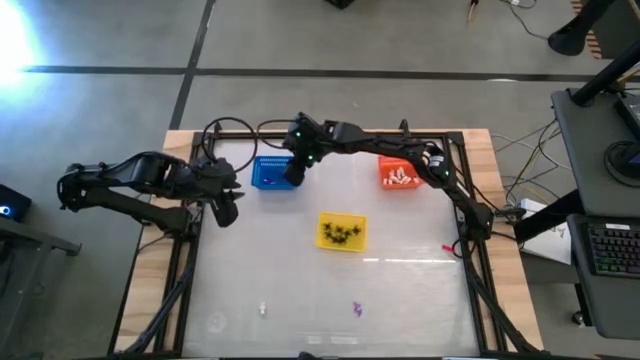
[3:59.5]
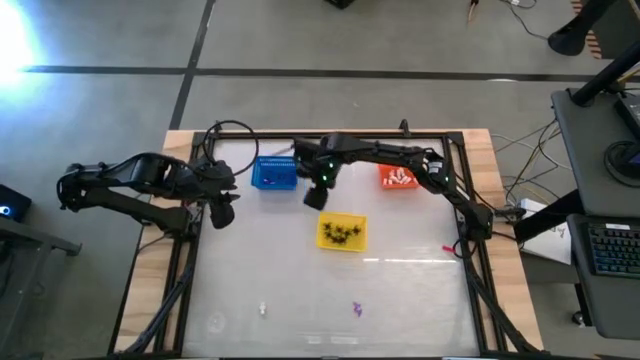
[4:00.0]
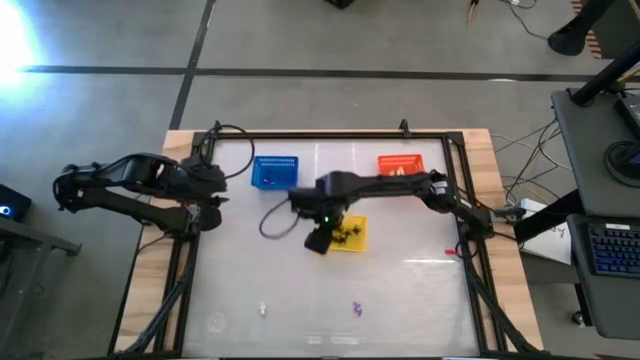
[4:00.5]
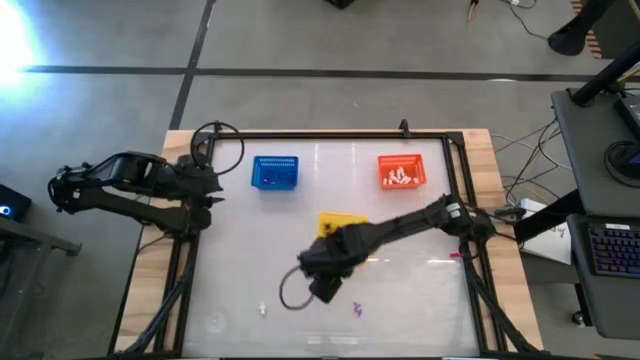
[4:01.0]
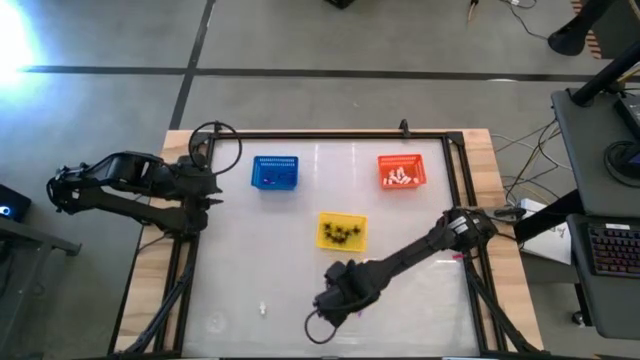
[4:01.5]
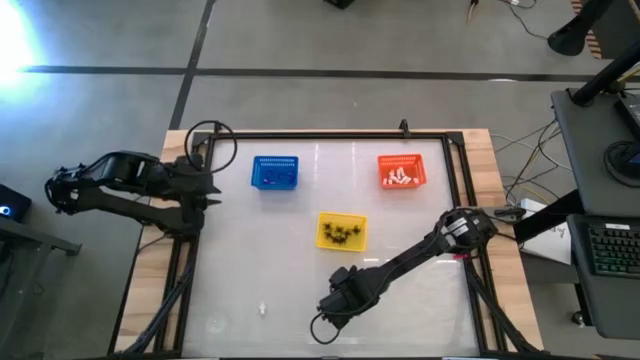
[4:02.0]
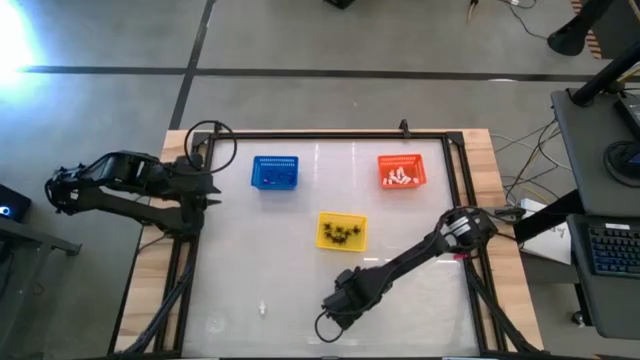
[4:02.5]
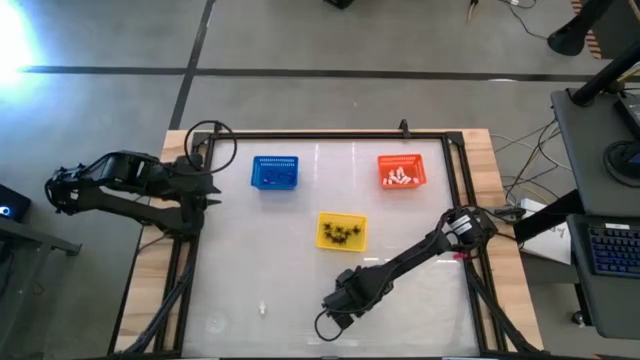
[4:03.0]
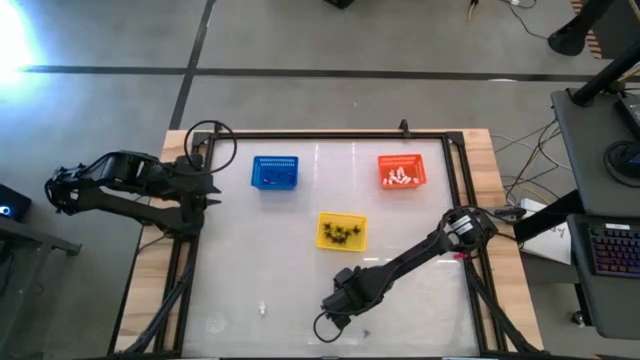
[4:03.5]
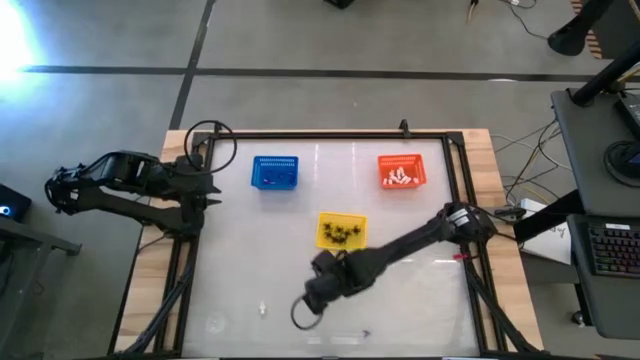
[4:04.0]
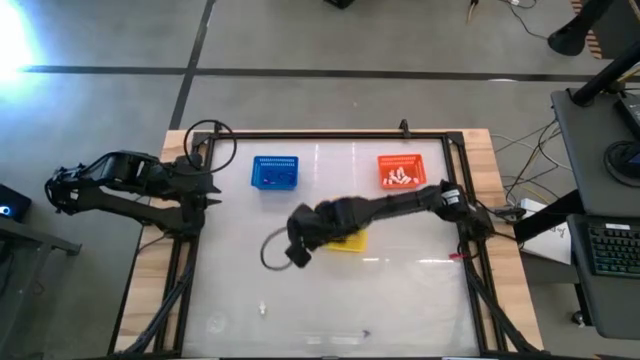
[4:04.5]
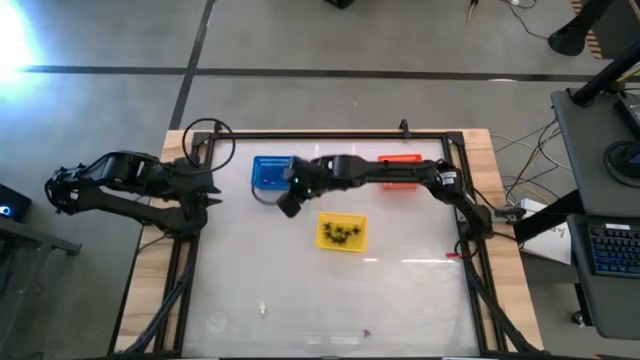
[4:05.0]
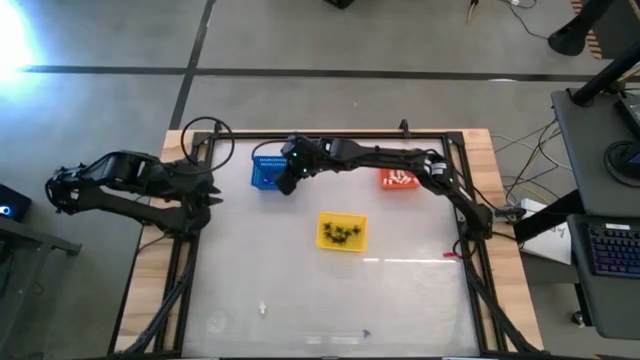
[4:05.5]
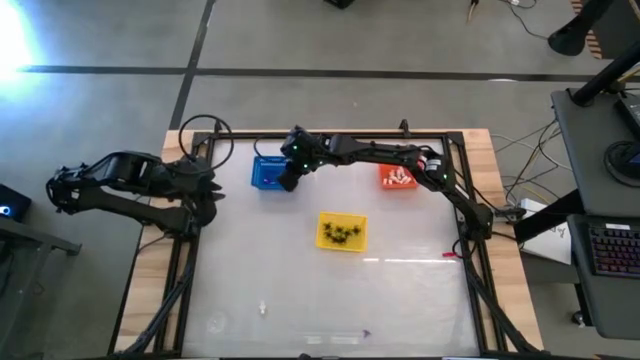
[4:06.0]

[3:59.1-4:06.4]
Task: Sort Halloween decoration
Put the purple witch hat toy into the blue bin

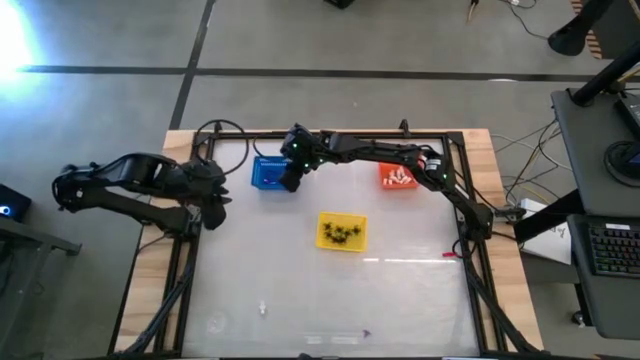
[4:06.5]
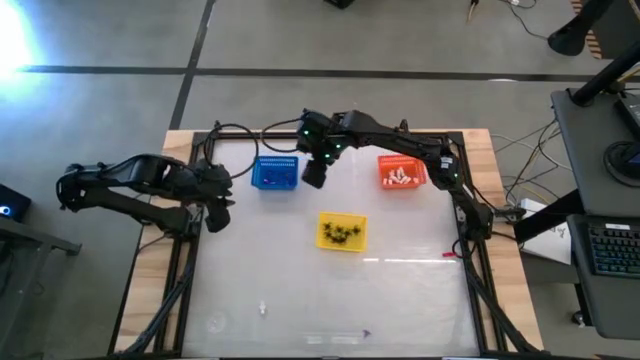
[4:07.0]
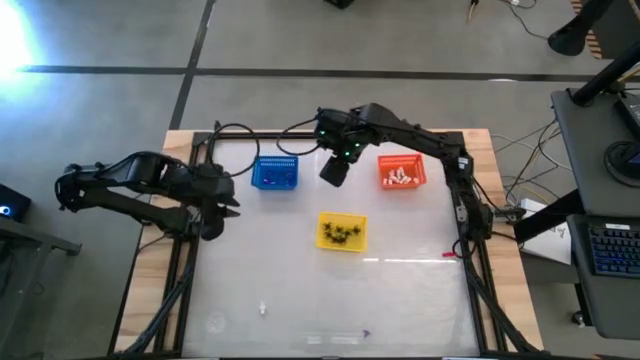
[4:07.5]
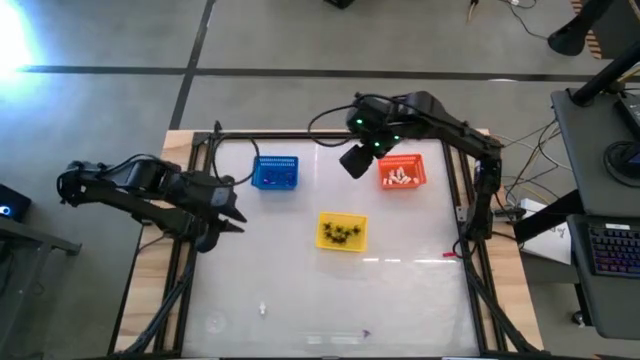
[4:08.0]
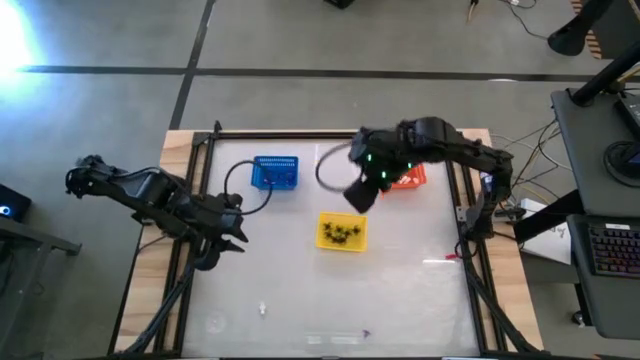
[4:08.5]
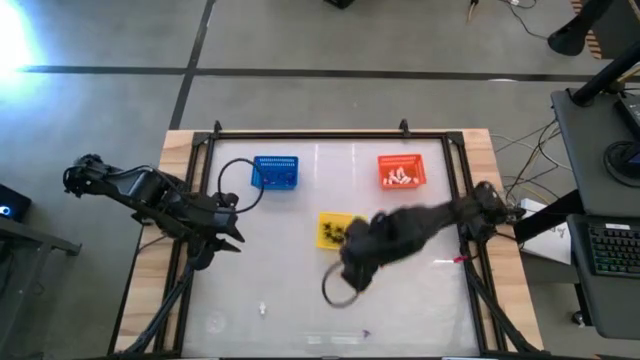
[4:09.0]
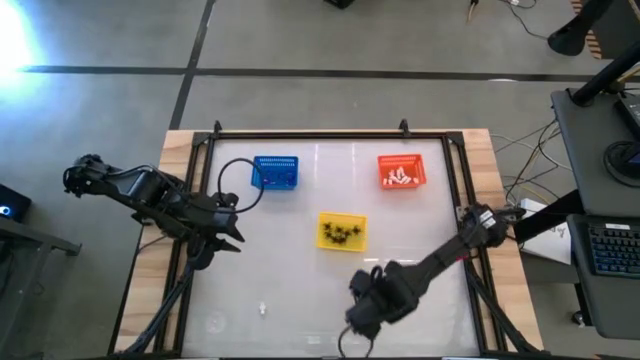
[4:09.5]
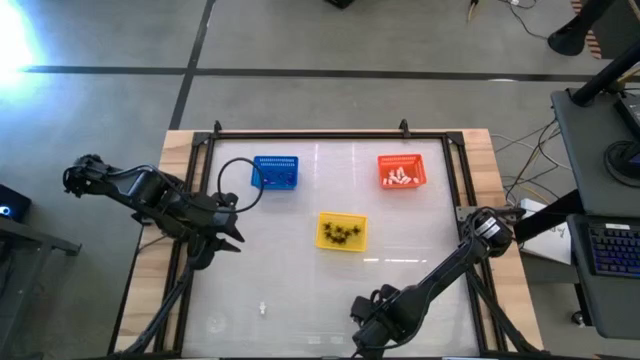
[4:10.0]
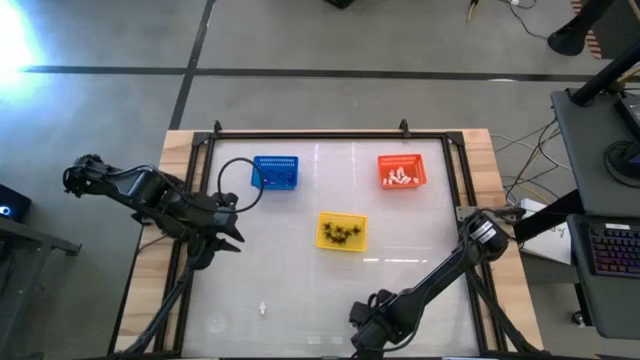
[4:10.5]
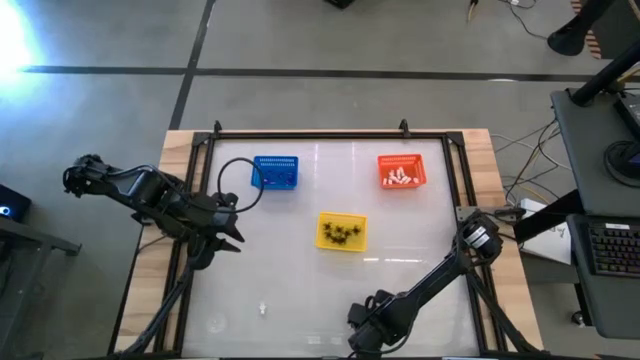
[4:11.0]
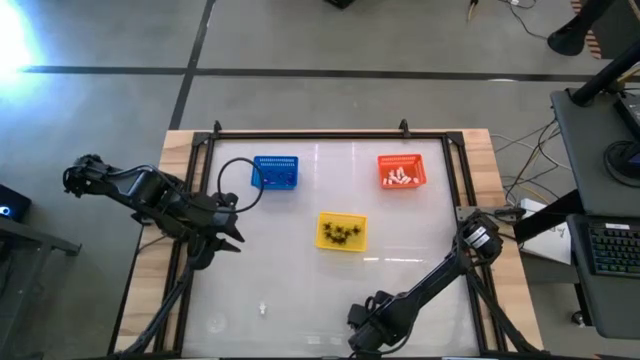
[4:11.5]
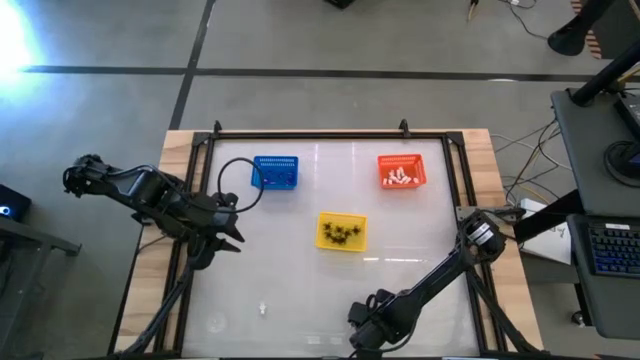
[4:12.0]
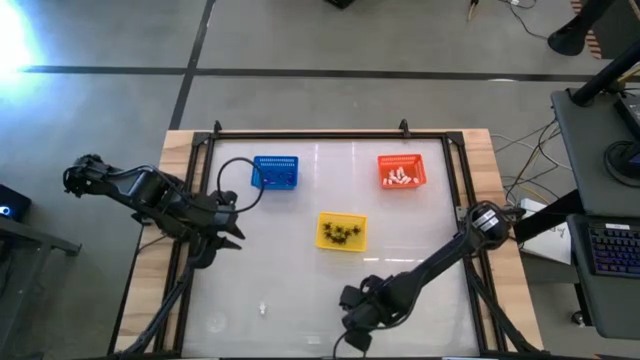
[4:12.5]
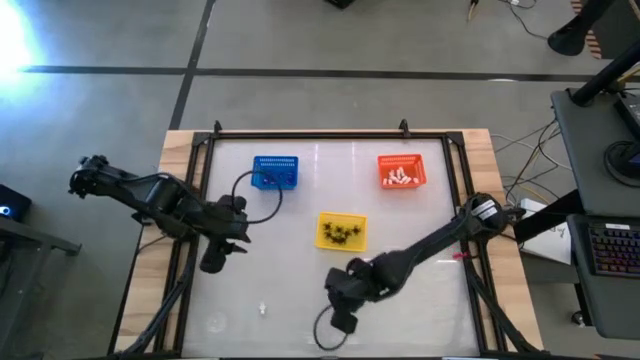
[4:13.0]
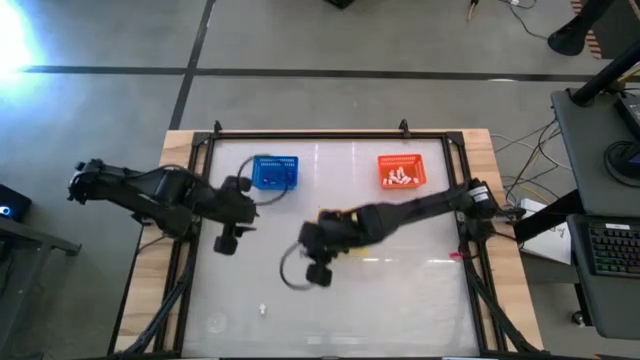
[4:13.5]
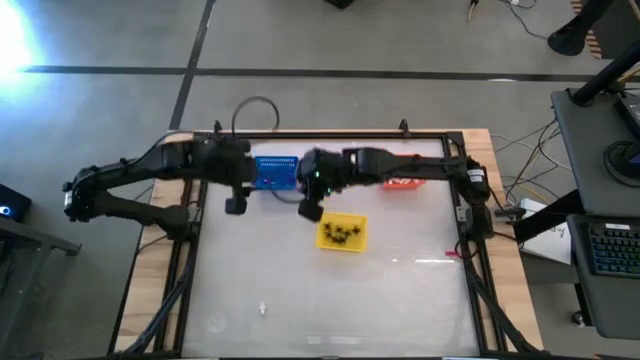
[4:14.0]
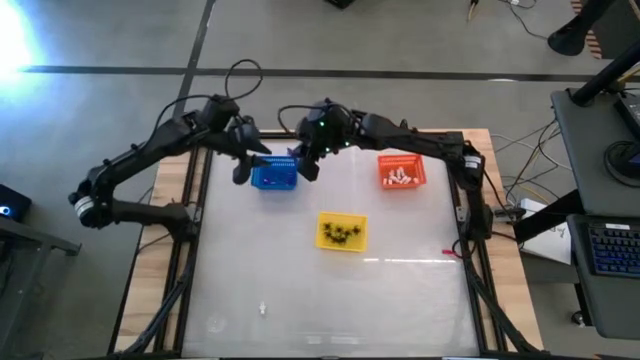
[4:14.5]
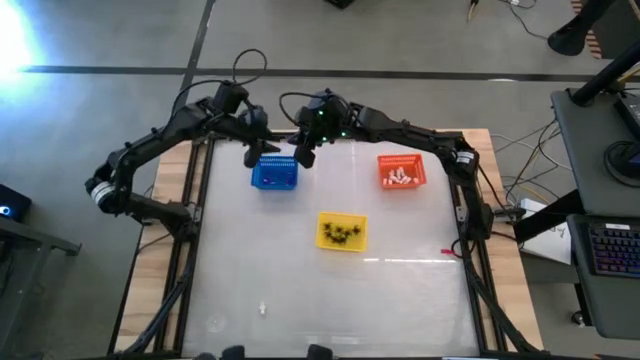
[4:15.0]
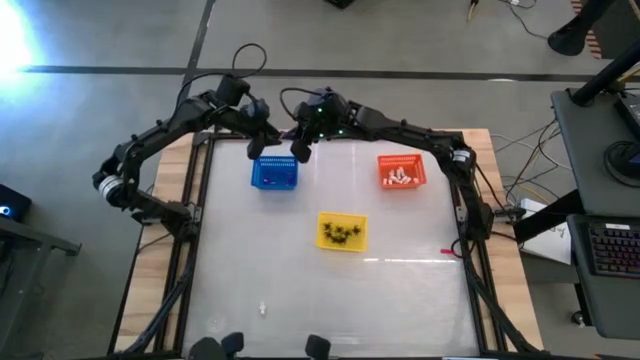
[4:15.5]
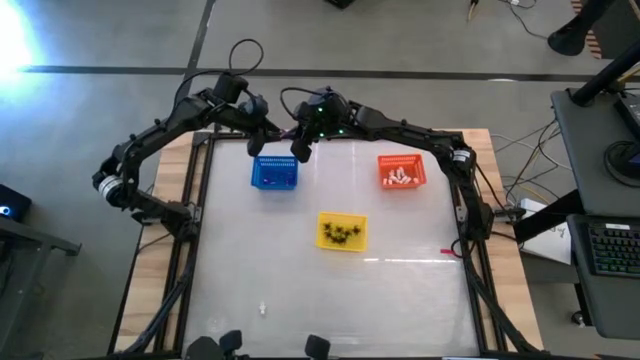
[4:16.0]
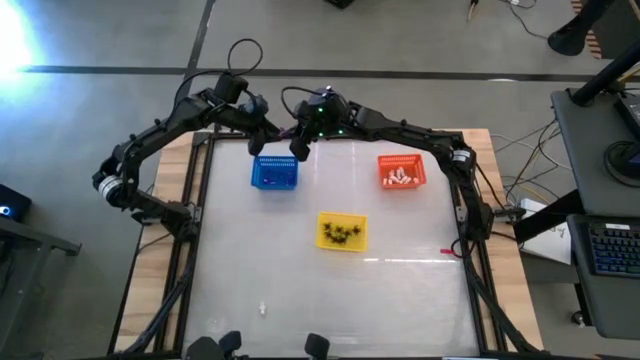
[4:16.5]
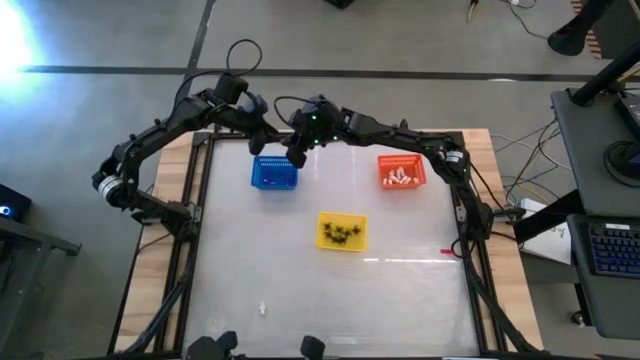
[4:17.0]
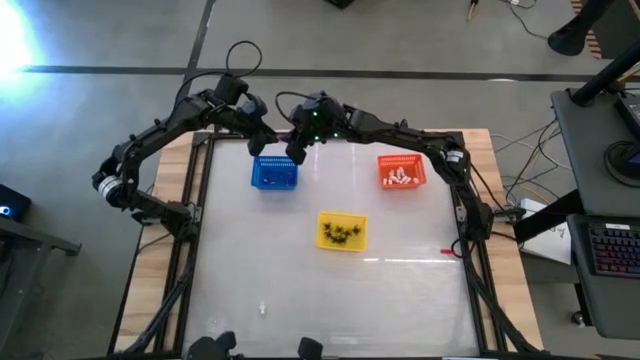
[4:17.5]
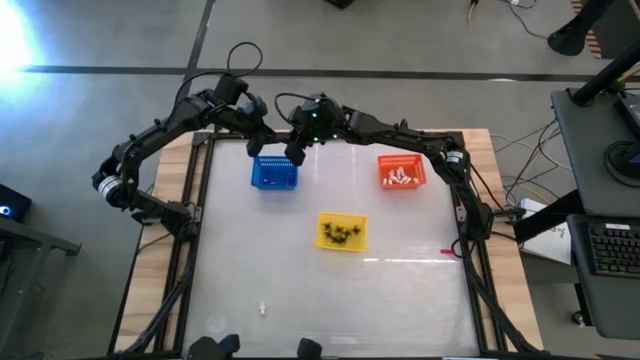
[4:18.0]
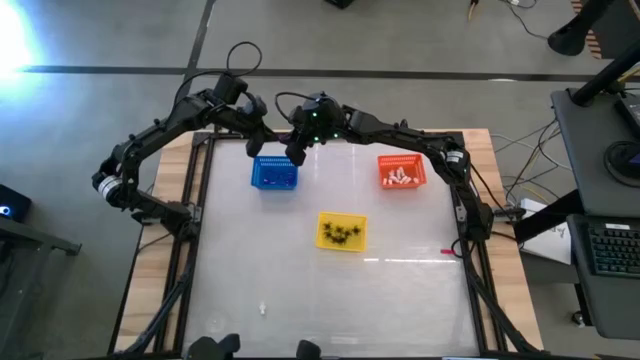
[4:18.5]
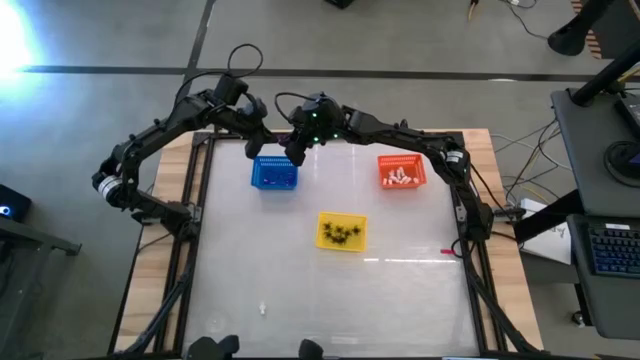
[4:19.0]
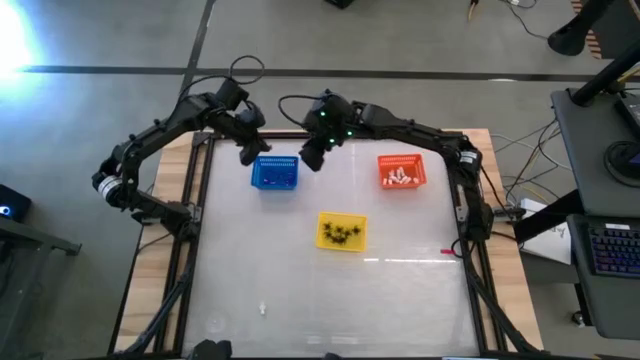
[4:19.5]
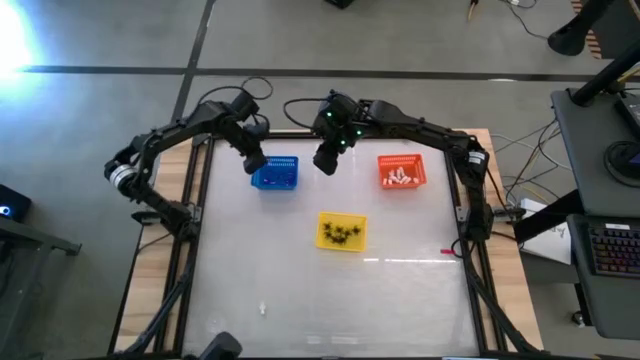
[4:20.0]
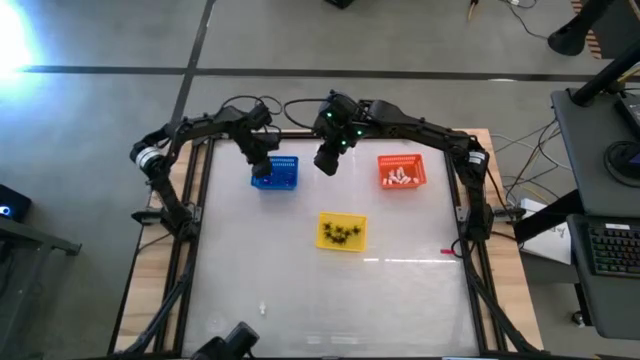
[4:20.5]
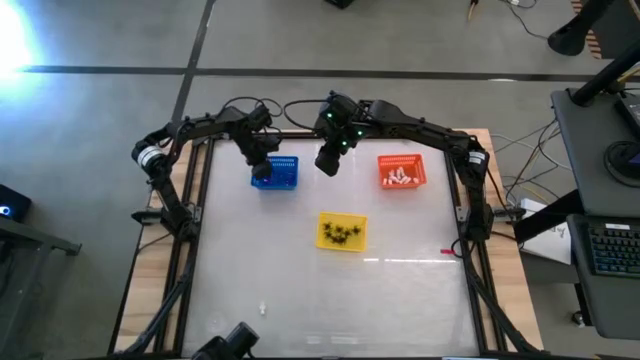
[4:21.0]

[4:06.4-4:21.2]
Put the purple witch hat toy into the blue bin
